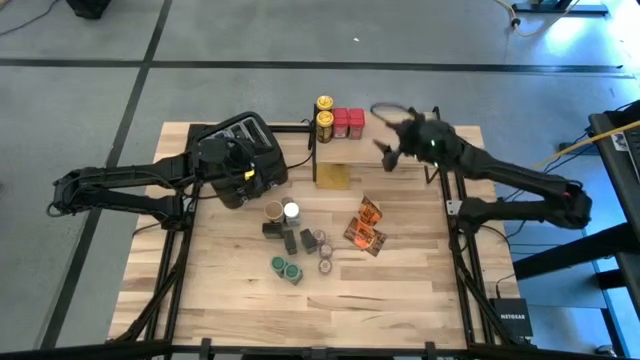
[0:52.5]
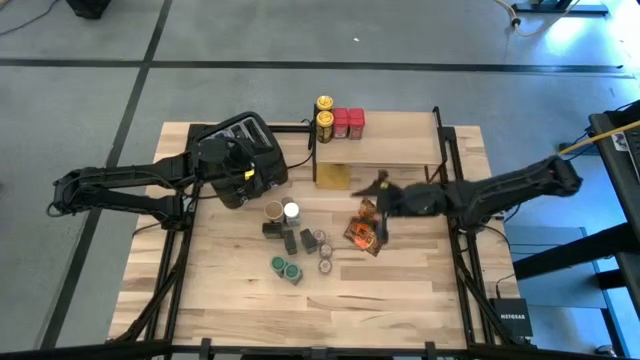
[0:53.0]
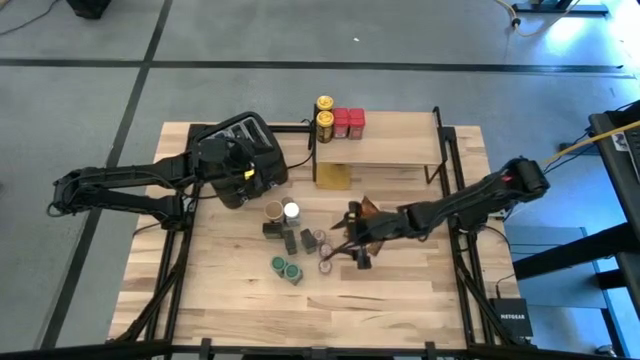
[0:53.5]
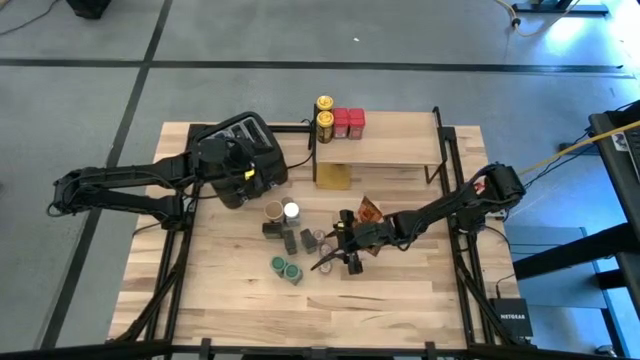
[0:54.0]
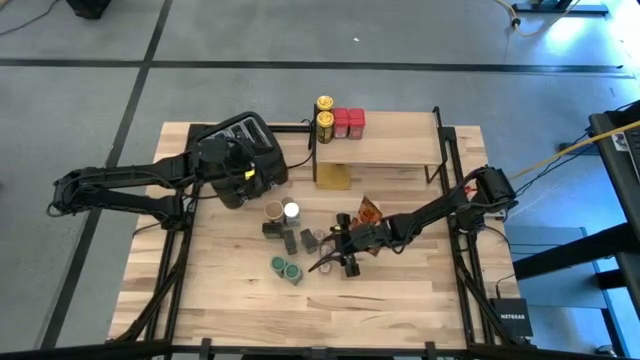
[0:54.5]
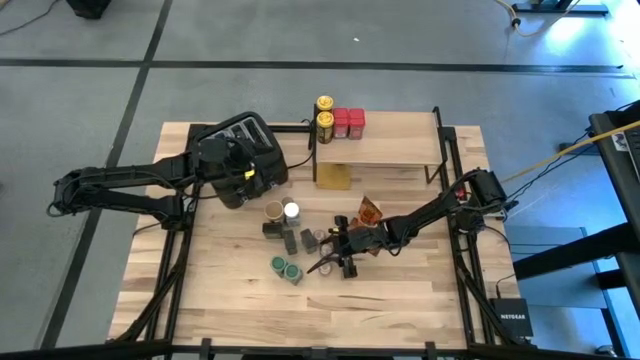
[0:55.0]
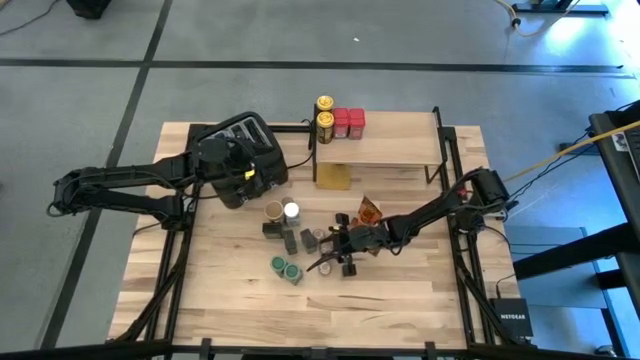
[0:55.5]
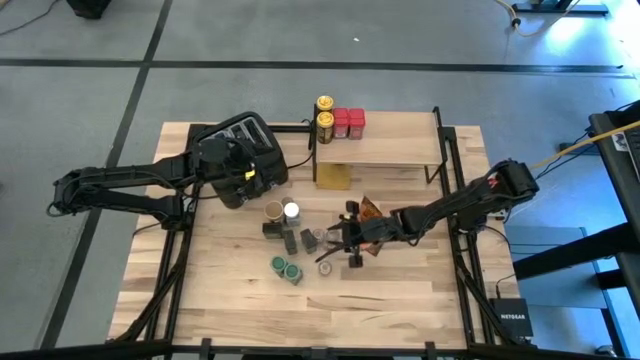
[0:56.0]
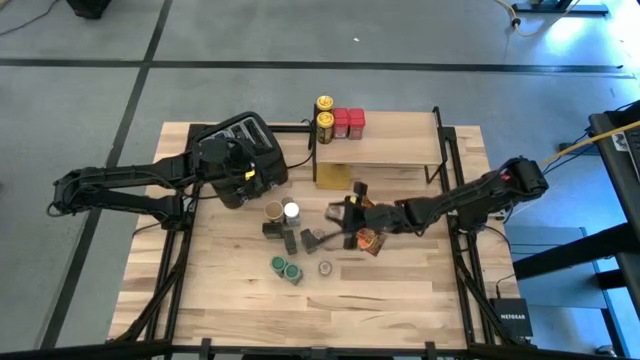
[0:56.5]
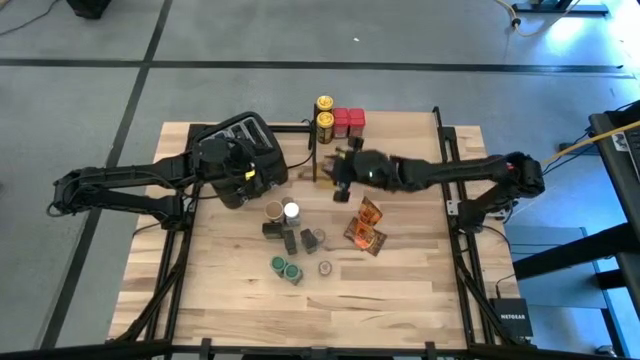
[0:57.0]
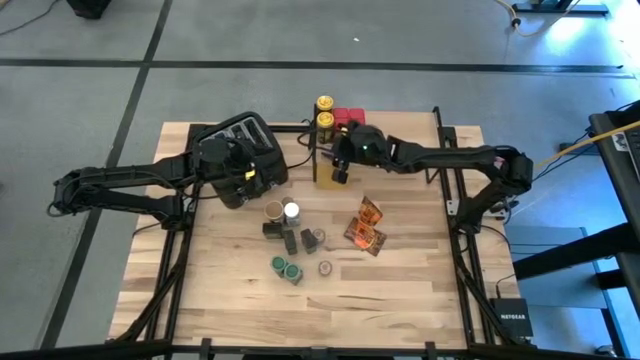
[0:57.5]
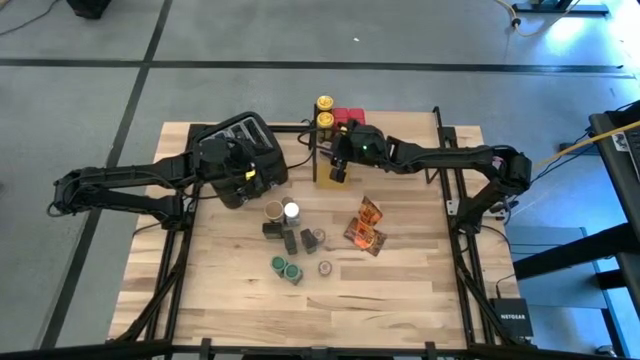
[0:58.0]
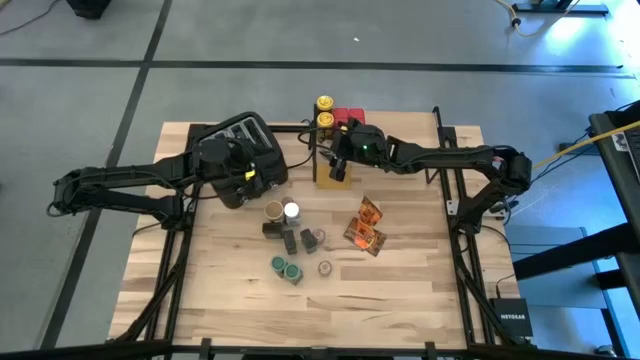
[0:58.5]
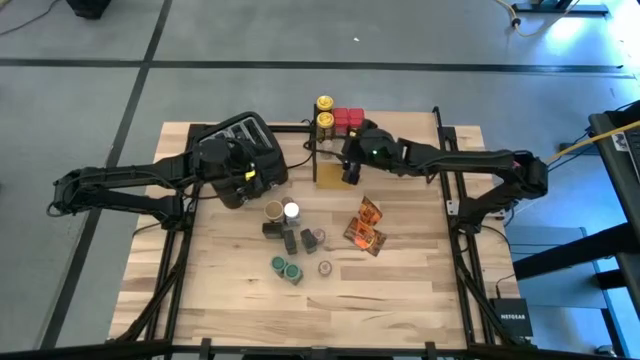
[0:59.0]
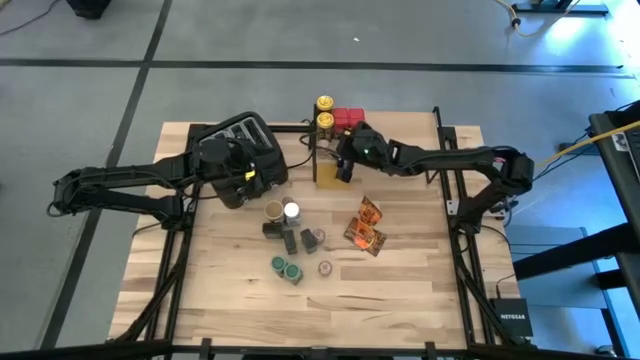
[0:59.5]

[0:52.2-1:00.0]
Task: Shelf spices
Put the brown seasoning bottle on the shelf

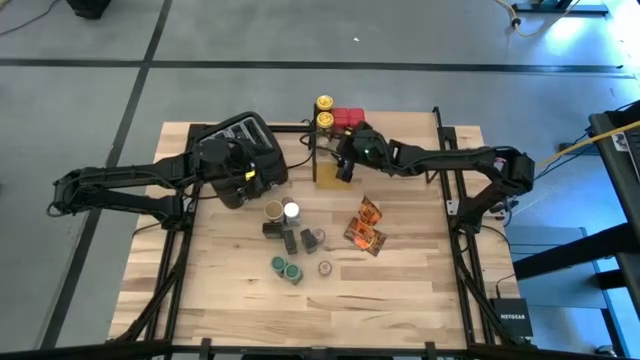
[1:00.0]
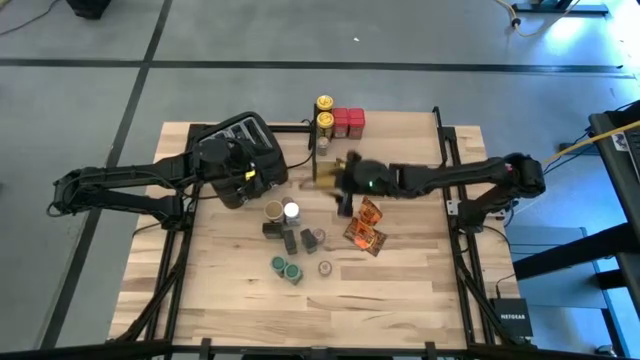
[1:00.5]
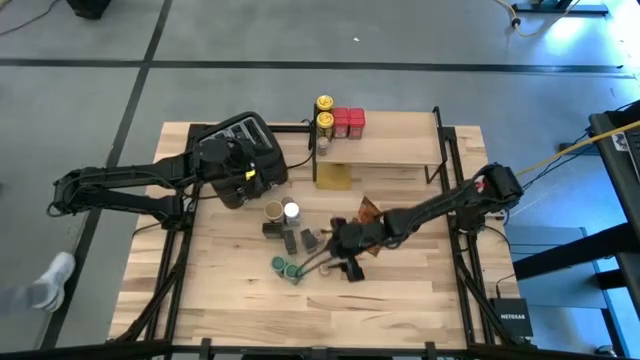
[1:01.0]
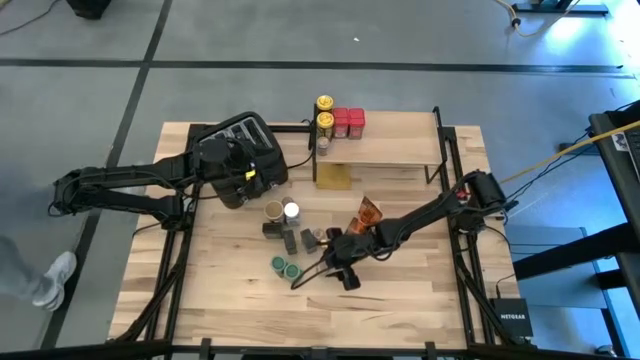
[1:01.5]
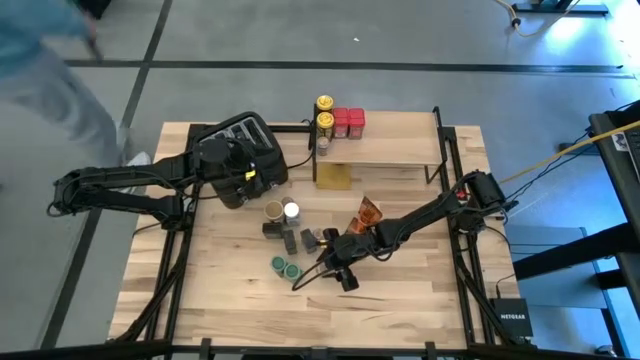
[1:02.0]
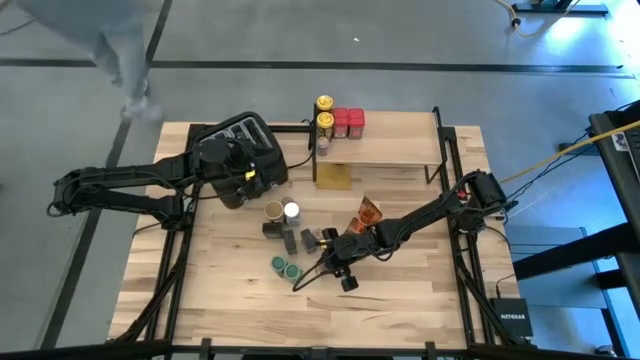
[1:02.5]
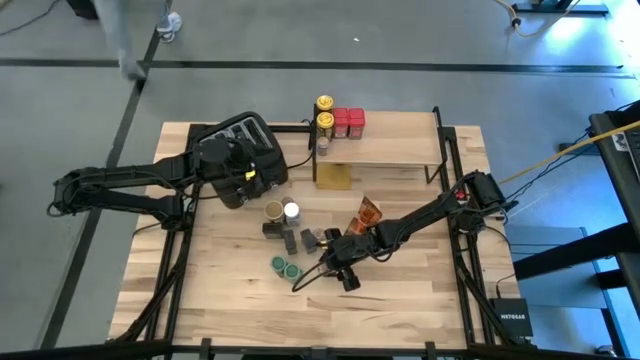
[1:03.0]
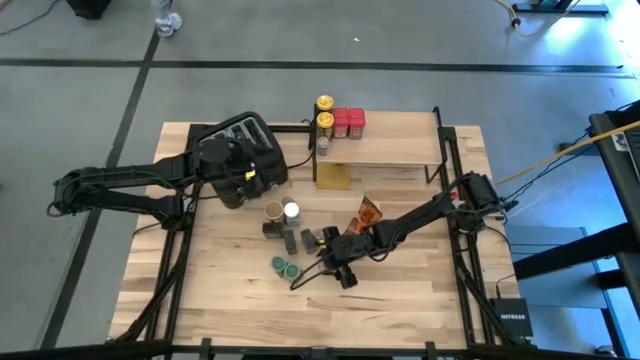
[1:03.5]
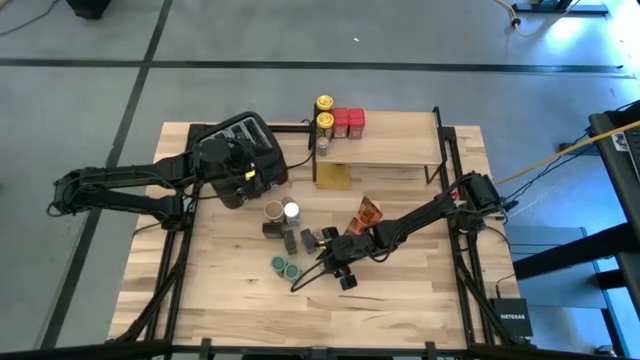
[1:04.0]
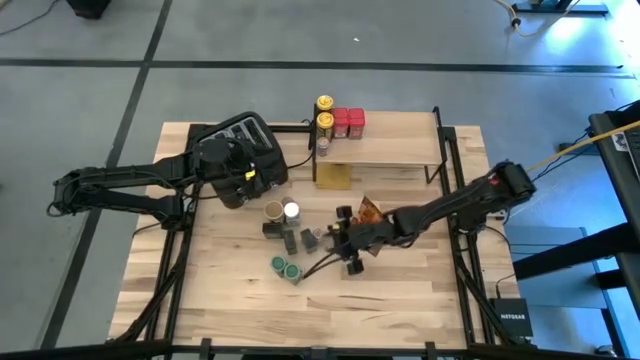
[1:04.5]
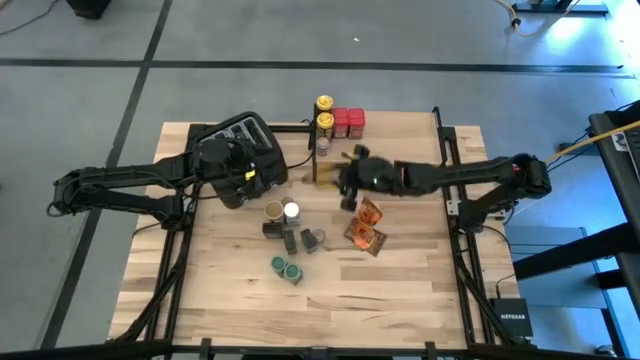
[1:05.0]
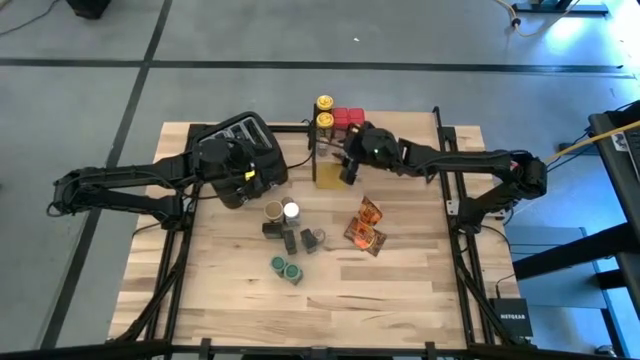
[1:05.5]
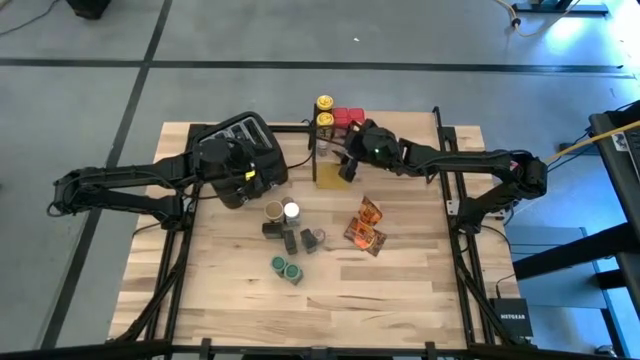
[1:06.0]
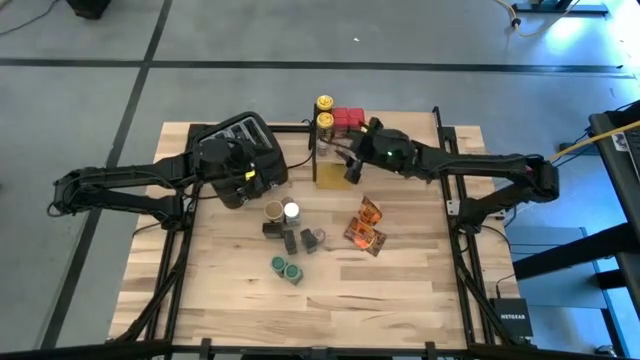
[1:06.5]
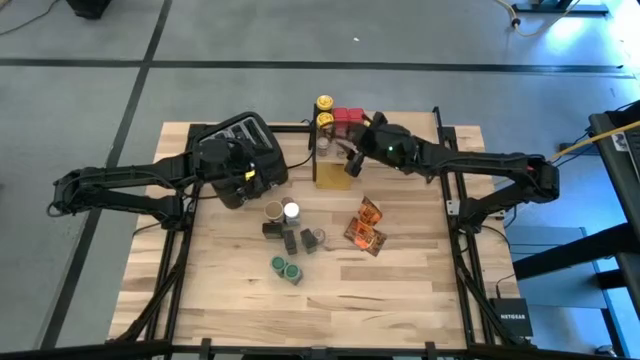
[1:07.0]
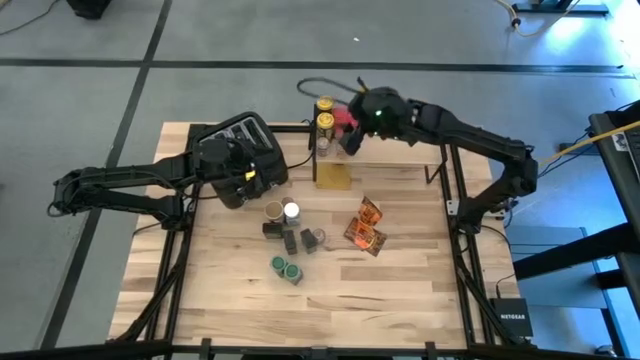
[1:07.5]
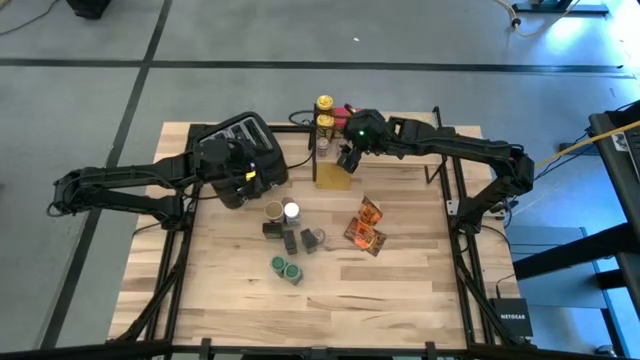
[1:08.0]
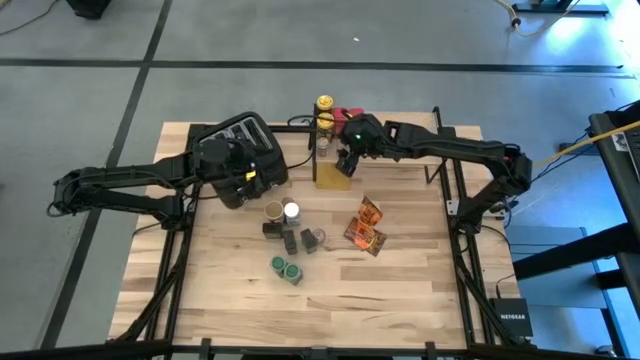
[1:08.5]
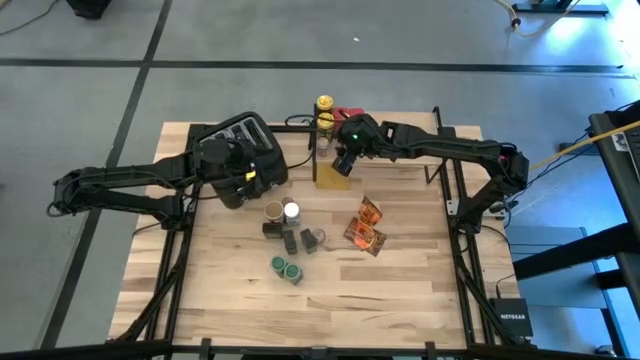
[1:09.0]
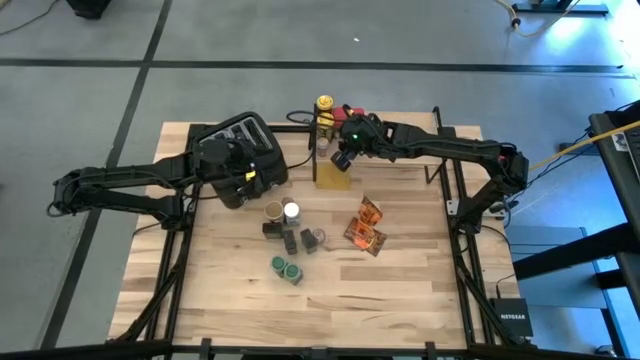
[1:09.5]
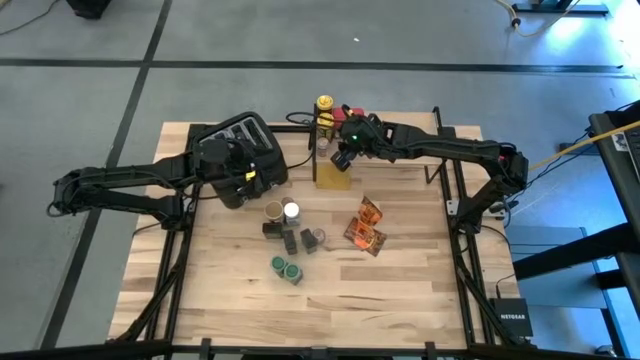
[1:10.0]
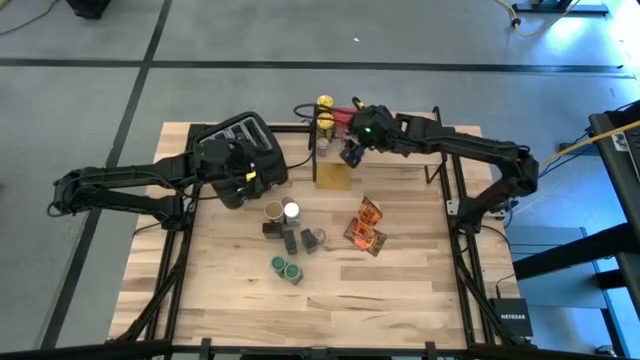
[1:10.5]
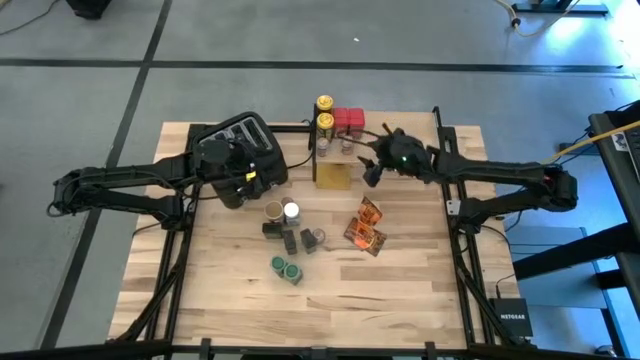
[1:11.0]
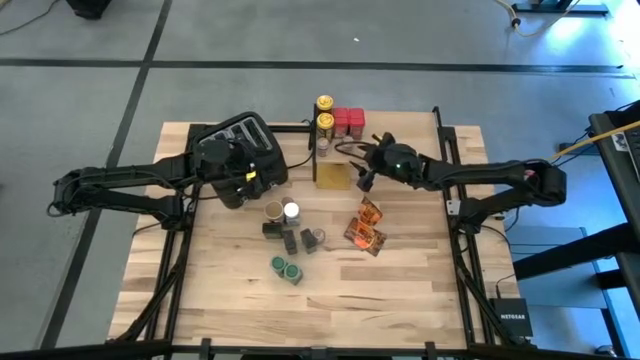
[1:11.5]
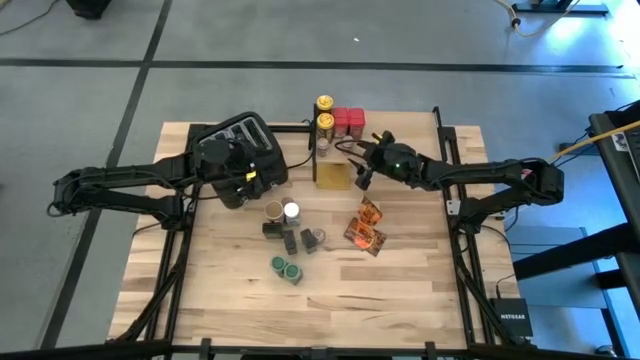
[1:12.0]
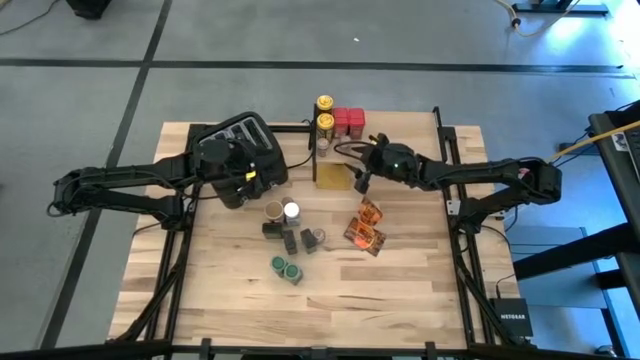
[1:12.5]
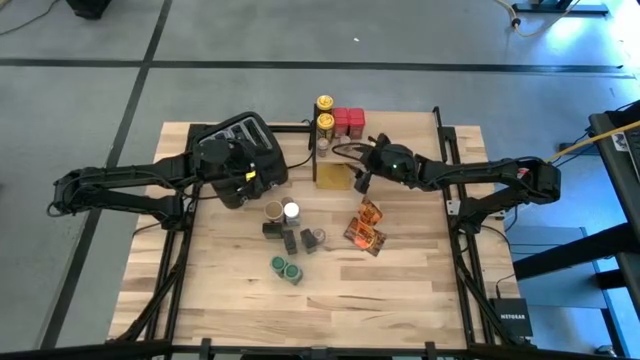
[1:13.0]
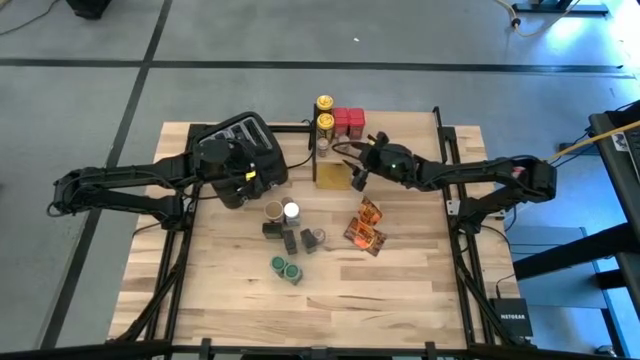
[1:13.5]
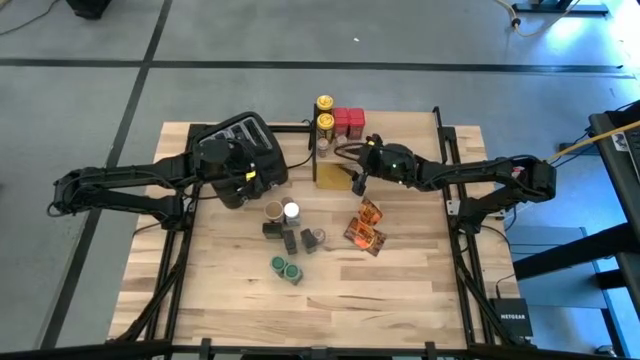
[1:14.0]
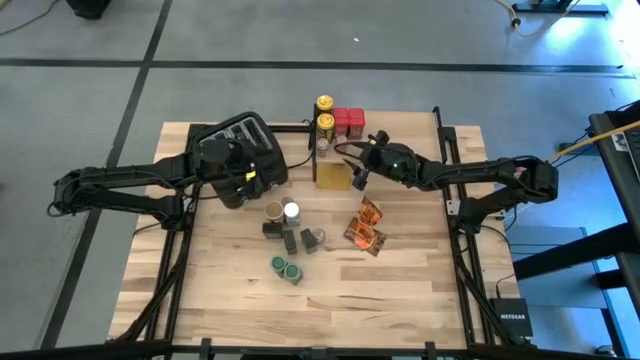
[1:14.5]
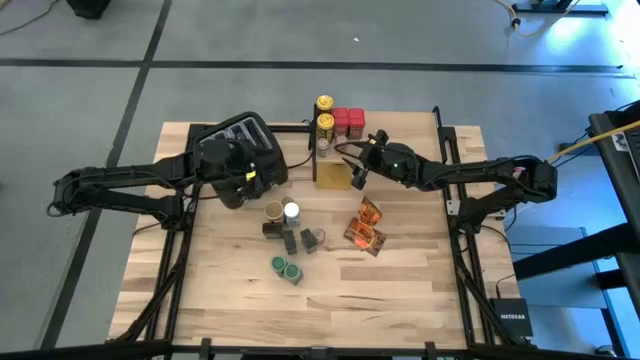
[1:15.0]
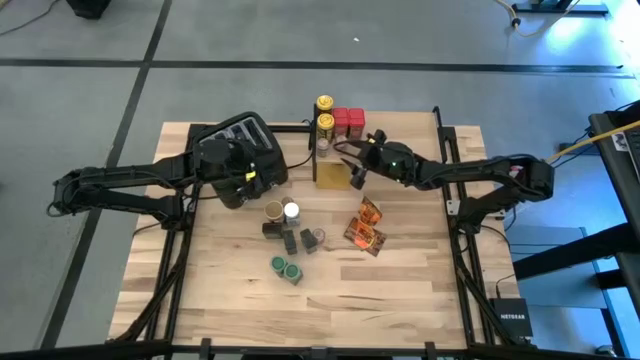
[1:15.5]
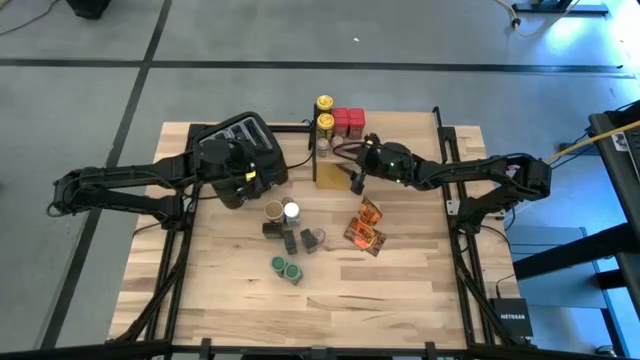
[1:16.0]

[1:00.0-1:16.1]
Put the brown seasoning bottle on the shelf
